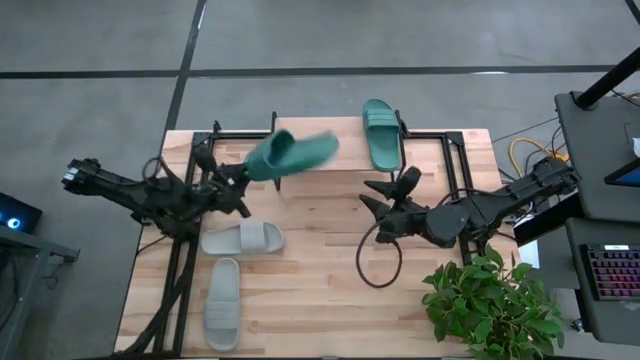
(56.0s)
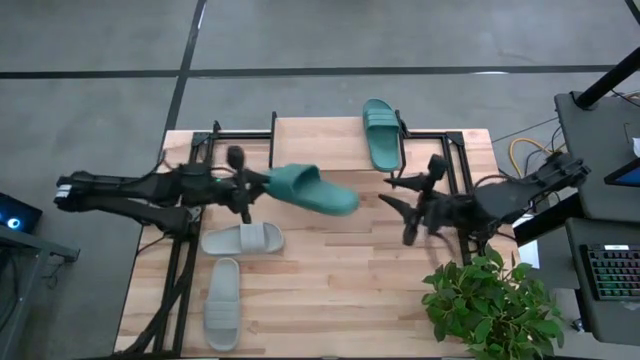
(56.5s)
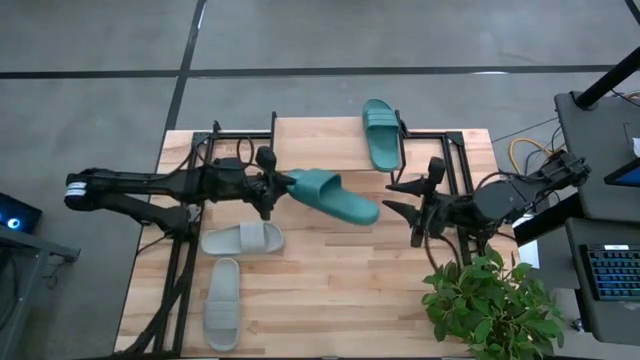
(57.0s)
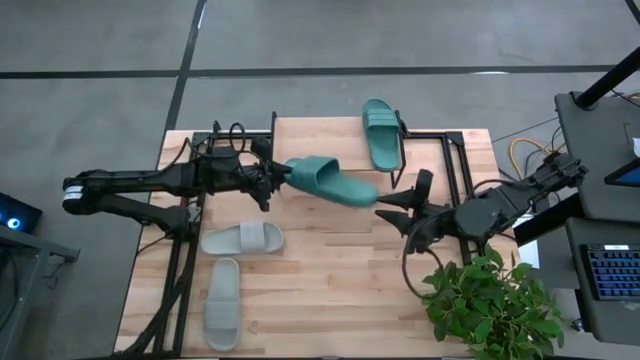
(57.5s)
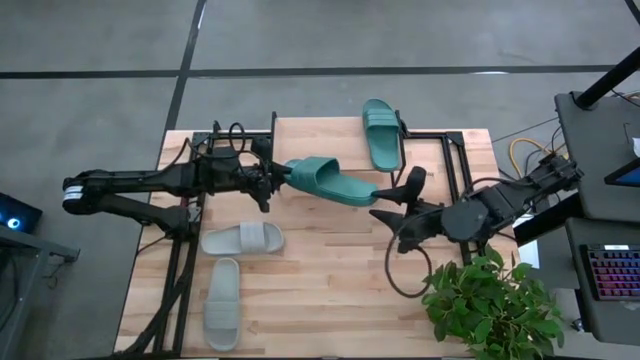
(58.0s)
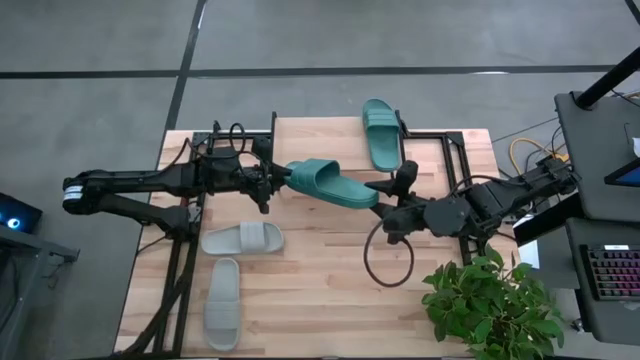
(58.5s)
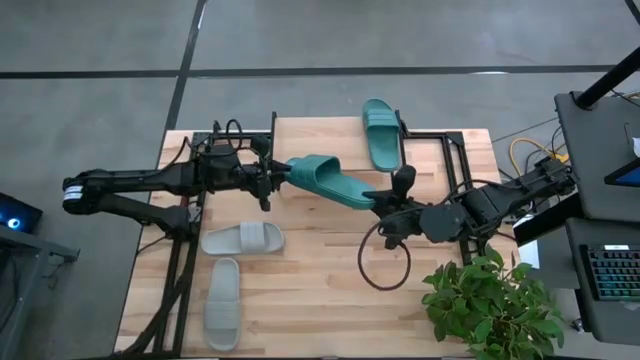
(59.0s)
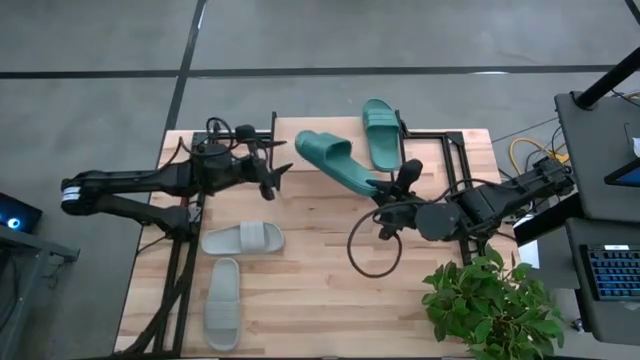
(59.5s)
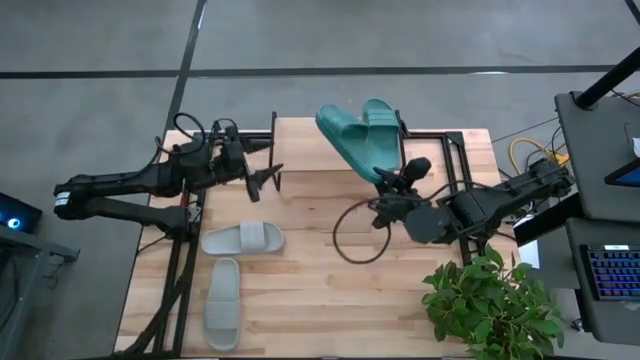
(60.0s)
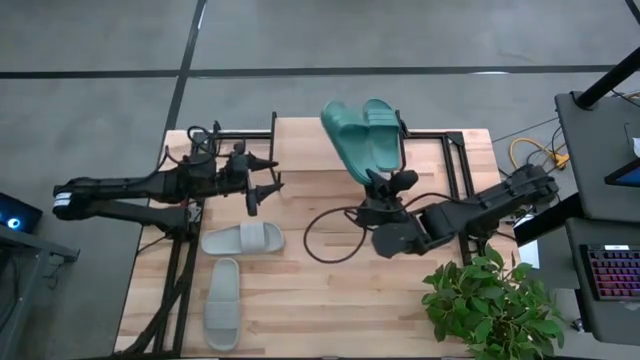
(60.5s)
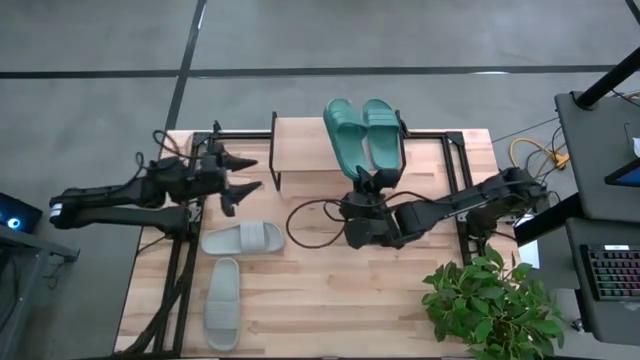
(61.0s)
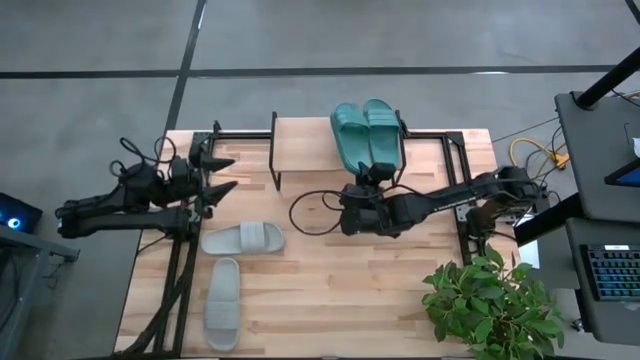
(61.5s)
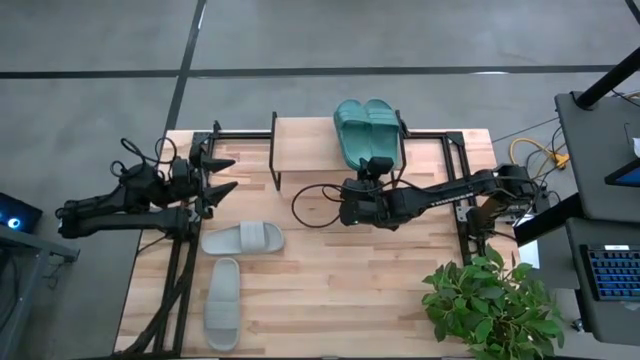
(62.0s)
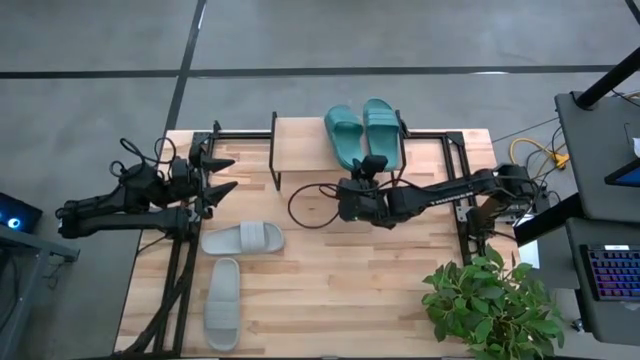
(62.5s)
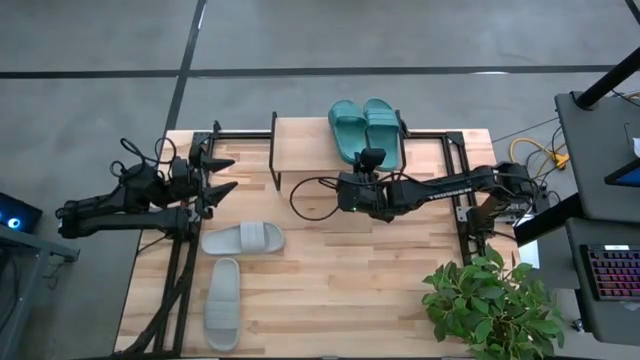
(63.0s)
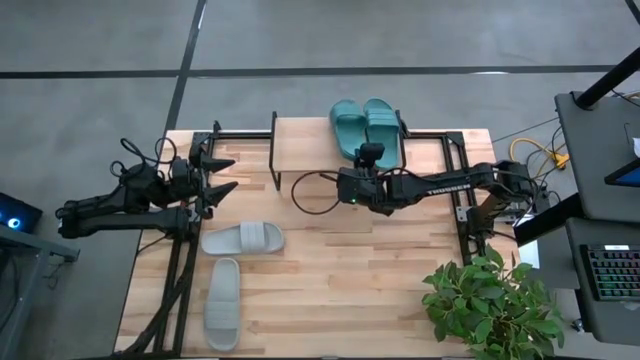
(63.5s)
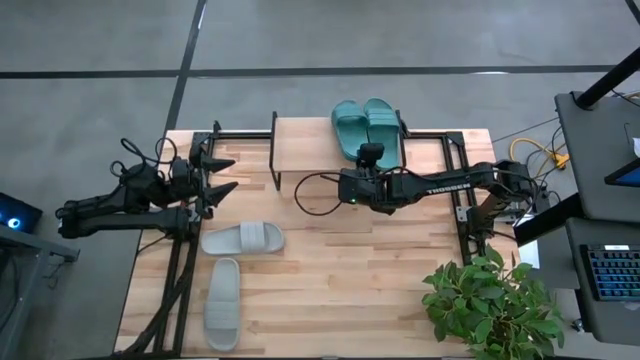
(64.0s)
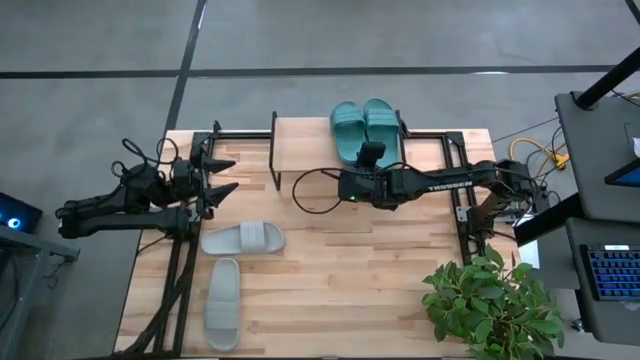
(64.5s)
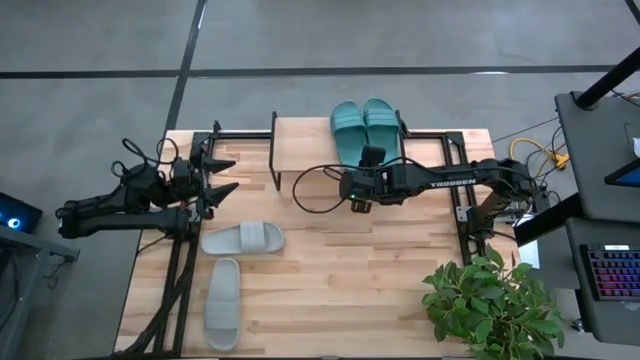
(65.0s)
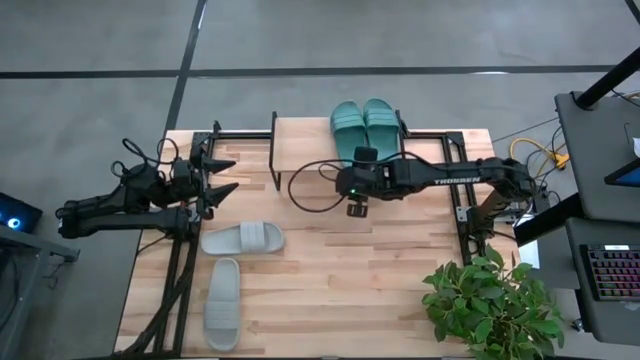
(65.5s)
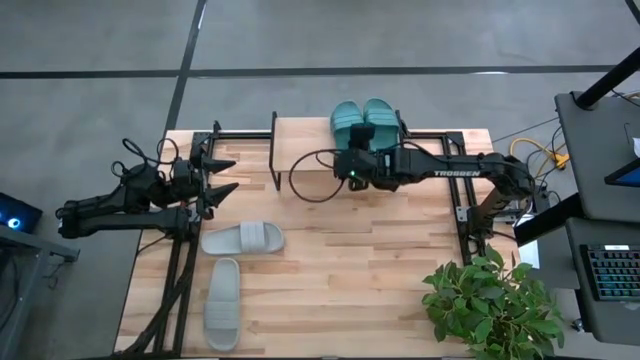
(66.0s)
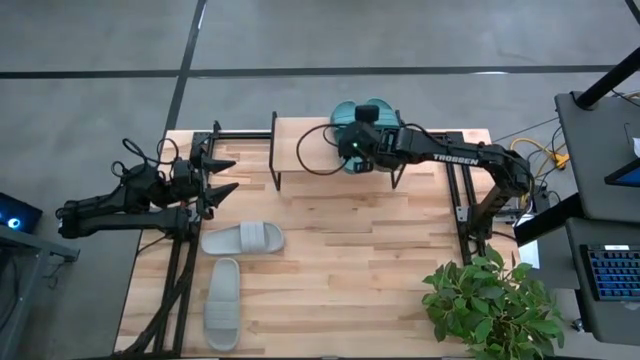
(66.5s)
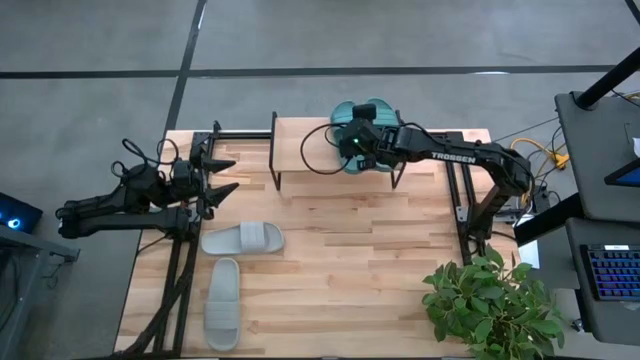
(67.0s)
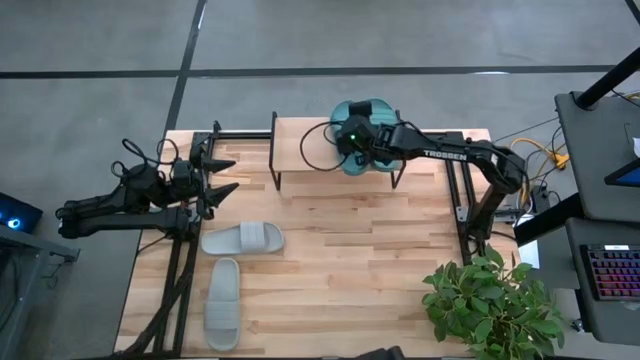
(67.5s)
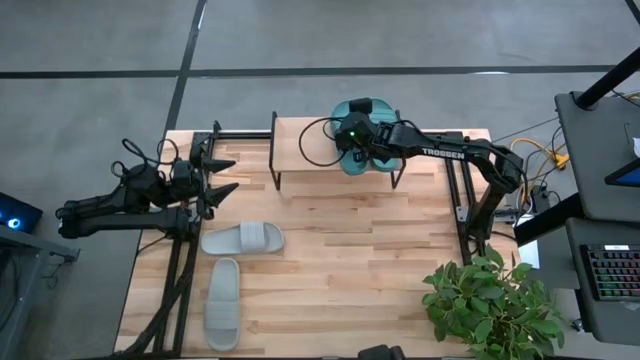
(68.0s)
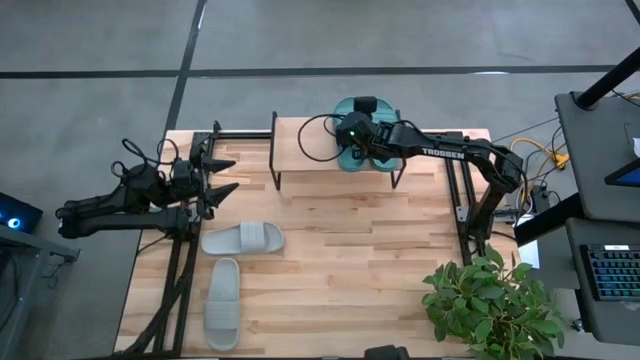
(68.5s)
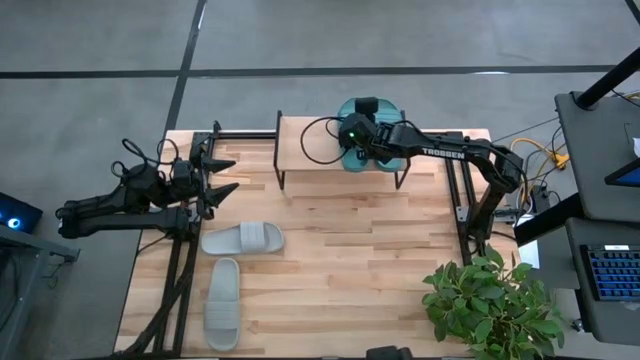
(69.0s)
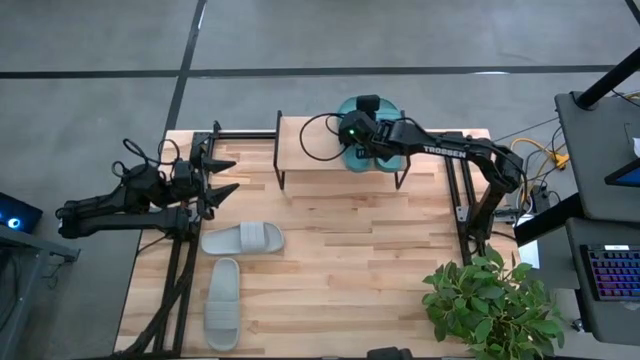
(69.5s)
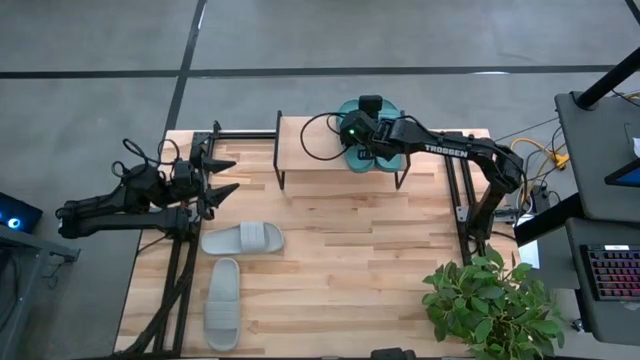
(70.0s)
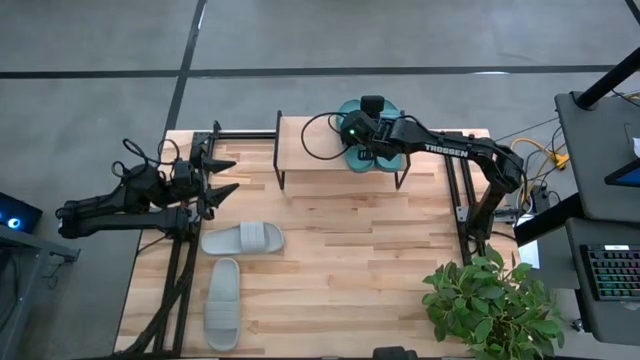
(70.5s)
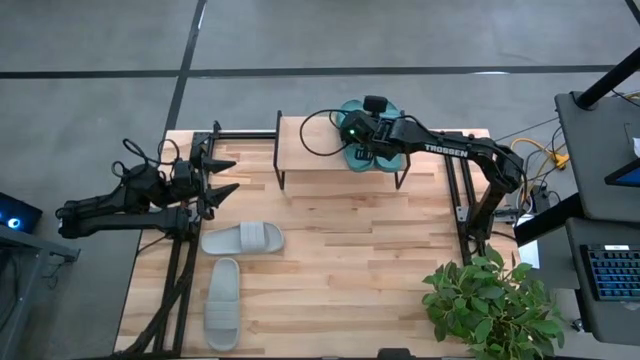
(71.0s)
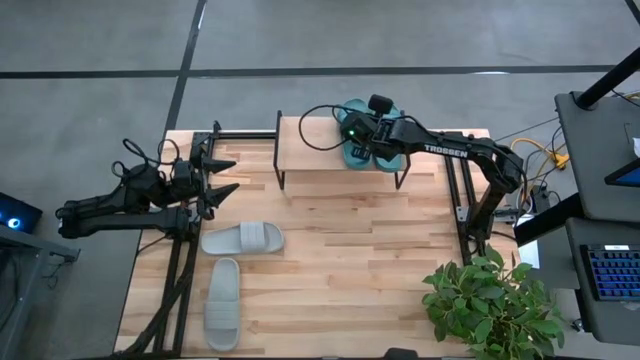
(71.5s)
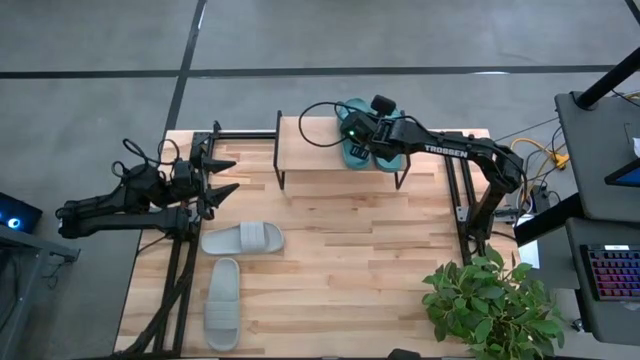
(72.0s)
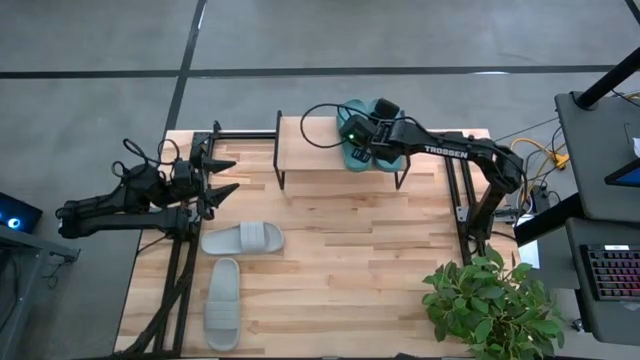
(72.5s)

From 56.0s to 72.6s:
Task: Pick and place slides into the shelf
Put the green slide on the shelf

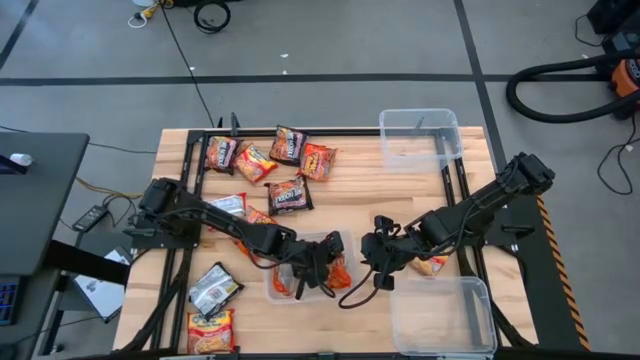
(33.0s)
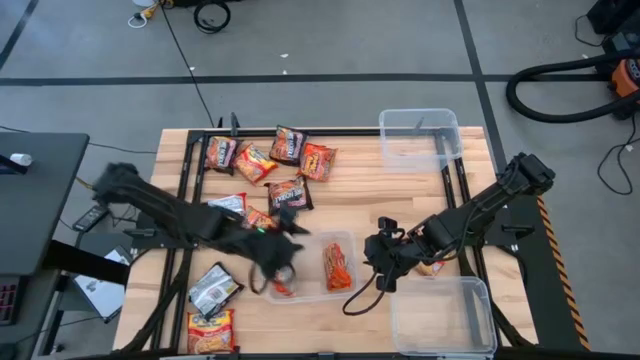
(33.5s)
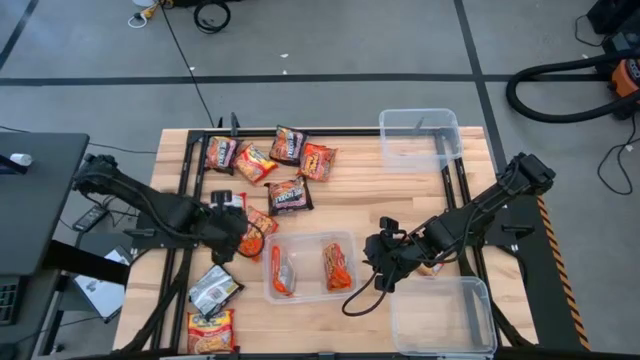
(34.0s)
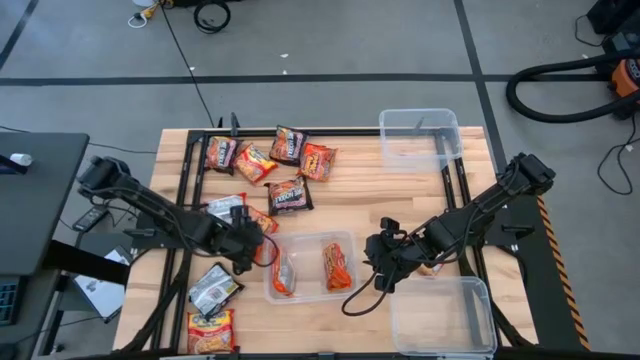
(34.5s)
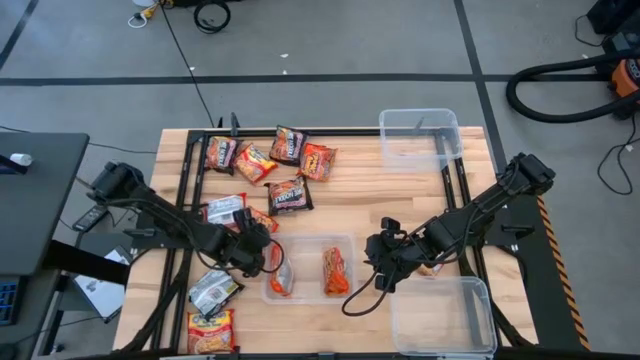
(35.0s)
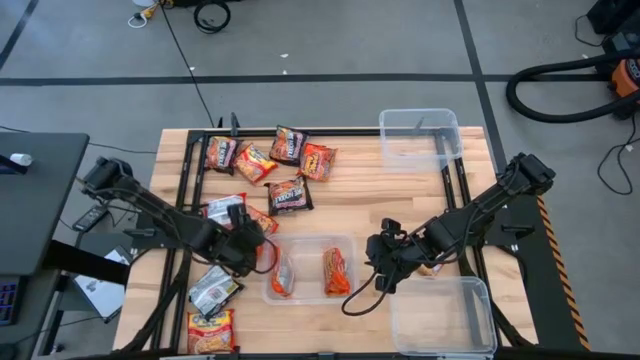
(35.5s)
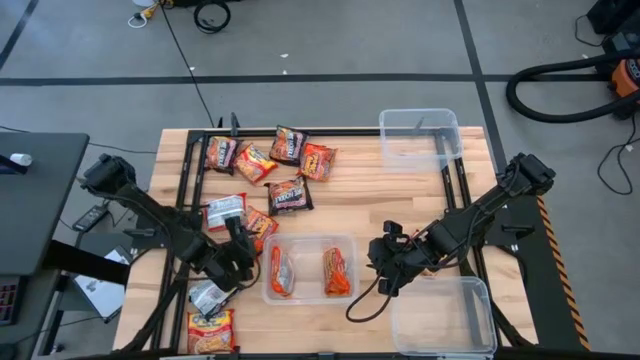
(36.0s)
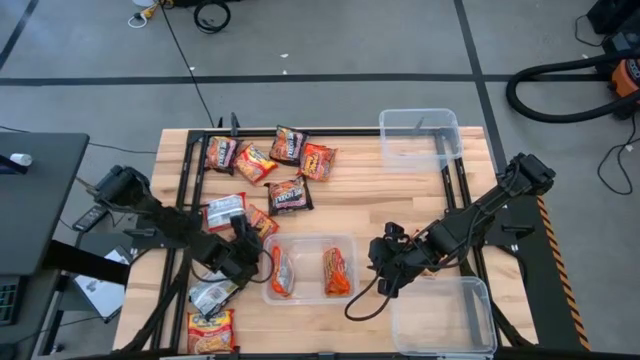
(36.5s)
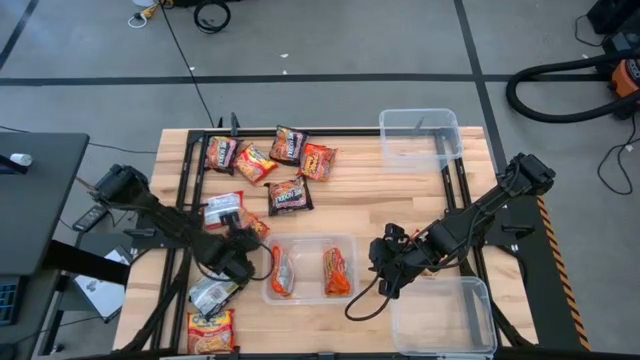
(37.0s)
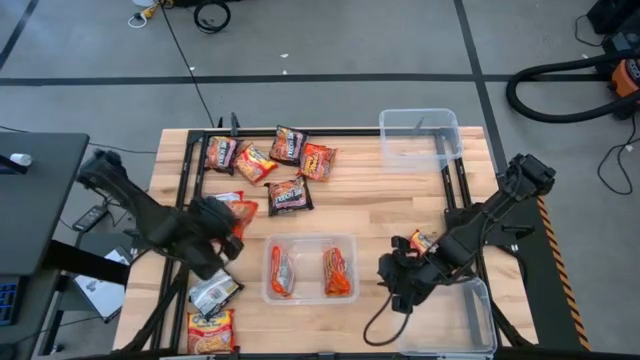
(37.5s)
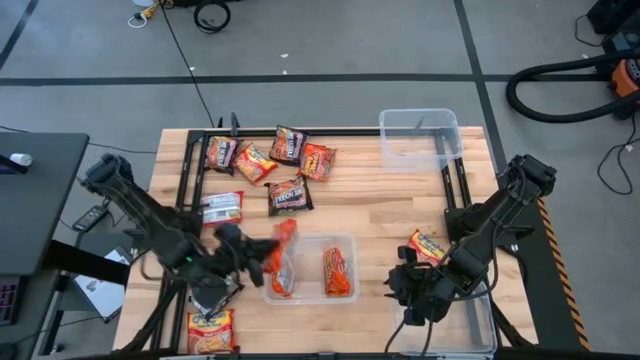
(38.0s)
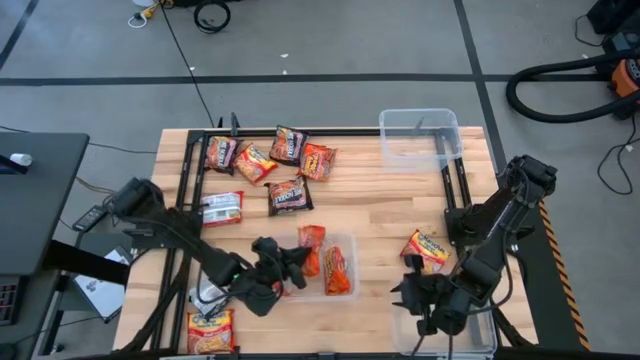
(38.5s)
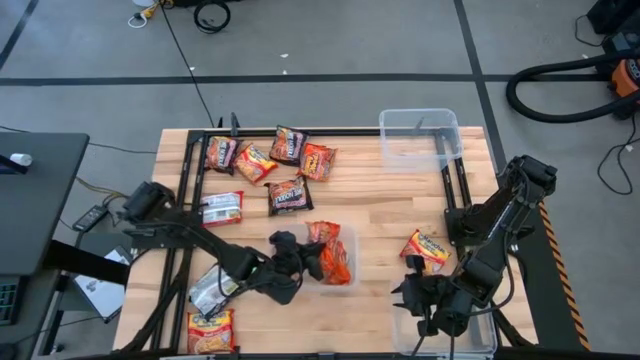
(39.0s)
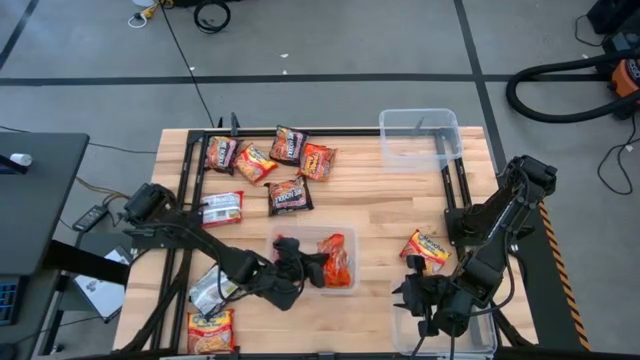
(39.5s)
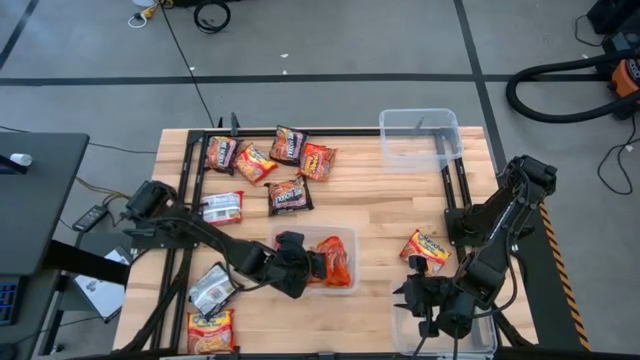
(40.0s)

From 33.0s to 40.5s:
Task: Sort Maruchan noodles
Put the orange noodle pack into the bottom left transparent bin
